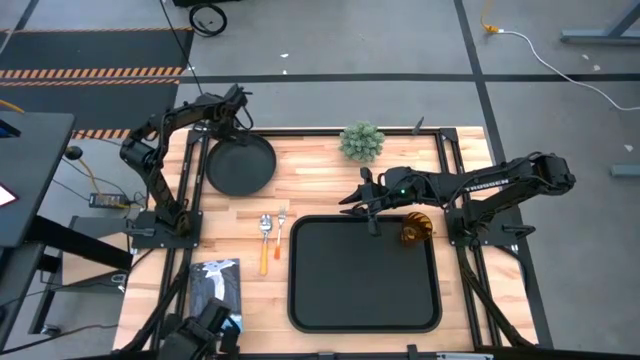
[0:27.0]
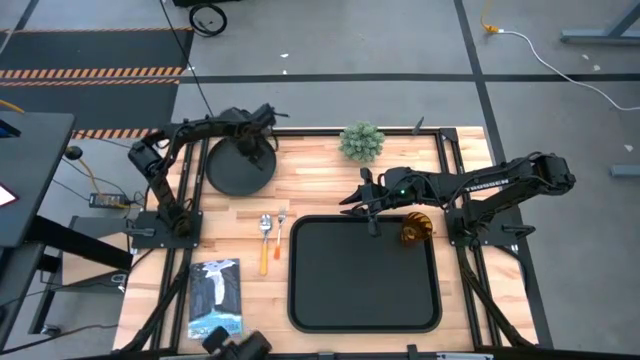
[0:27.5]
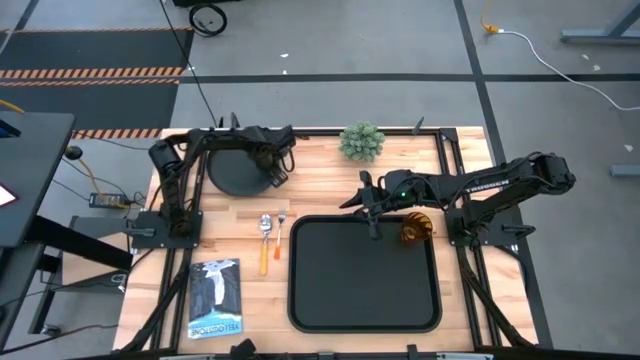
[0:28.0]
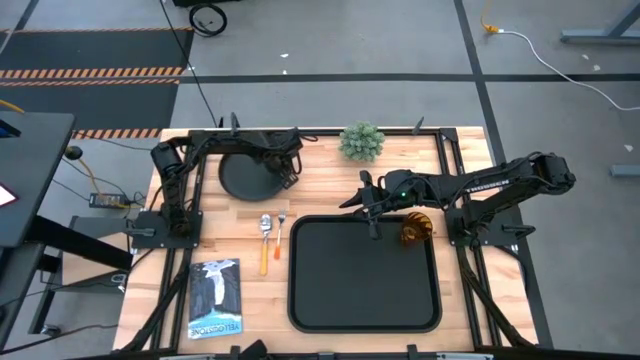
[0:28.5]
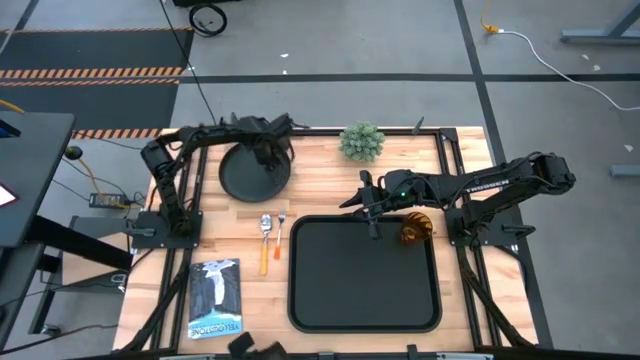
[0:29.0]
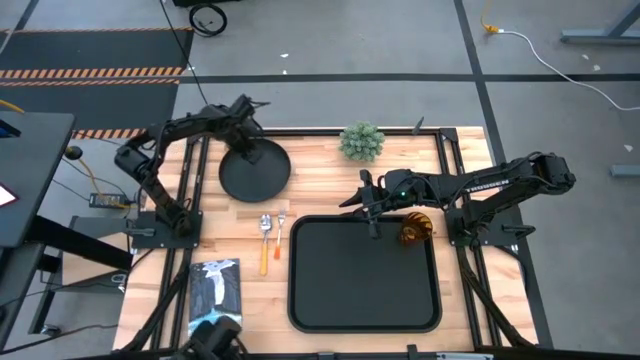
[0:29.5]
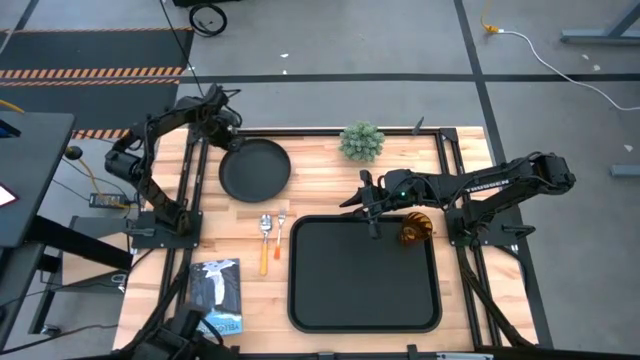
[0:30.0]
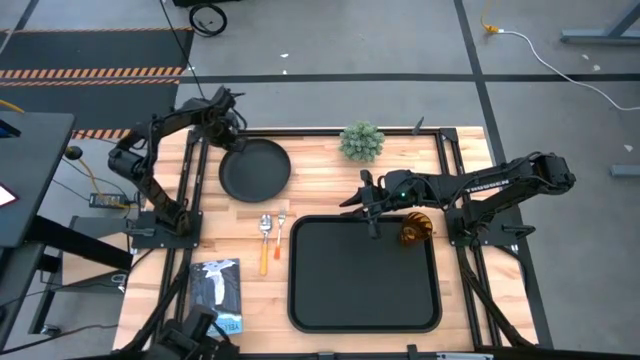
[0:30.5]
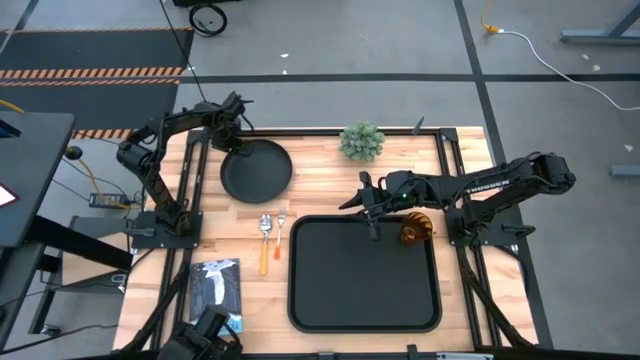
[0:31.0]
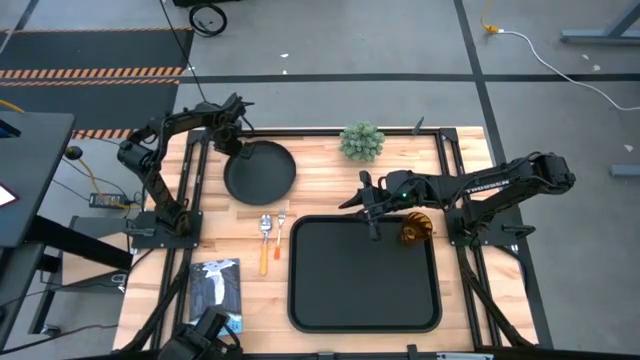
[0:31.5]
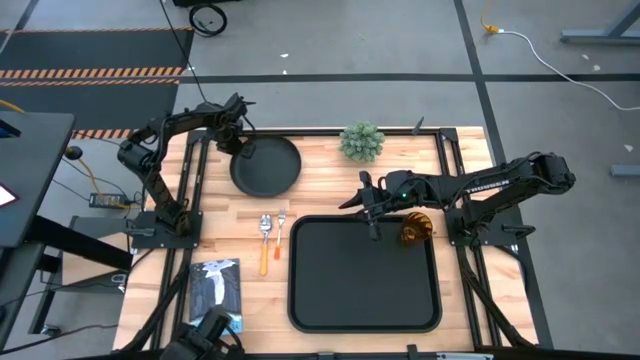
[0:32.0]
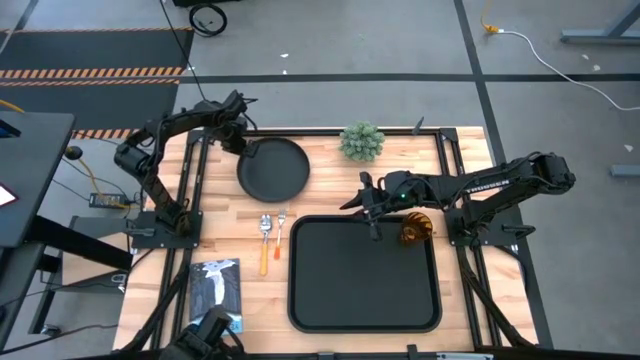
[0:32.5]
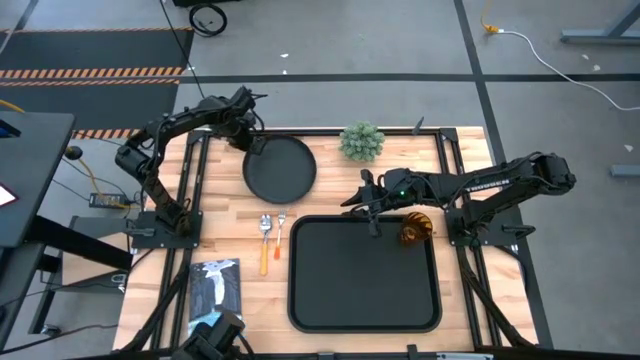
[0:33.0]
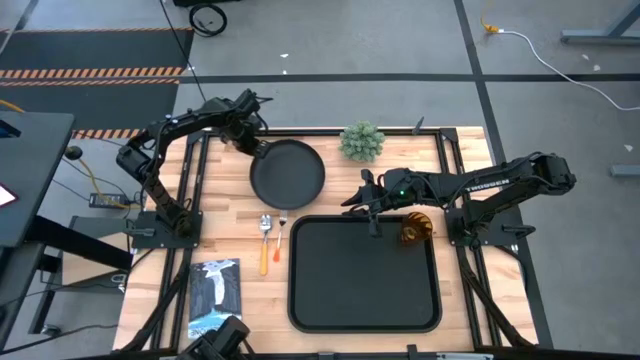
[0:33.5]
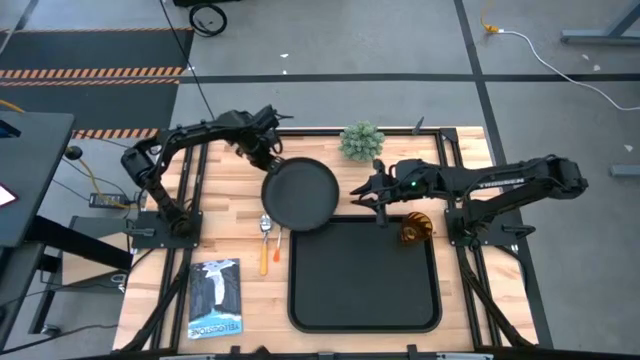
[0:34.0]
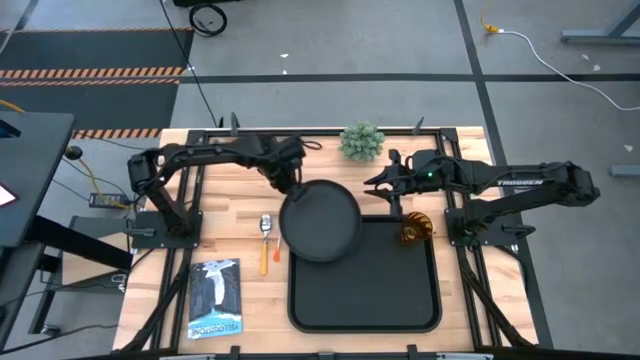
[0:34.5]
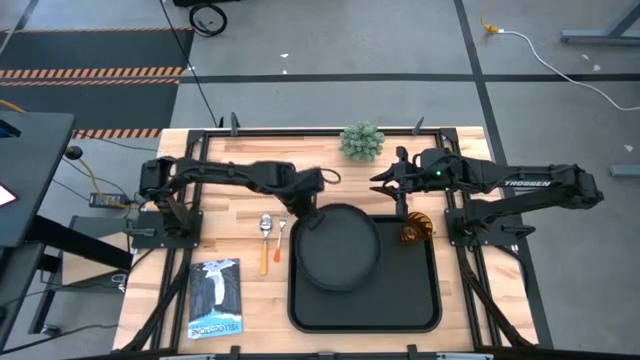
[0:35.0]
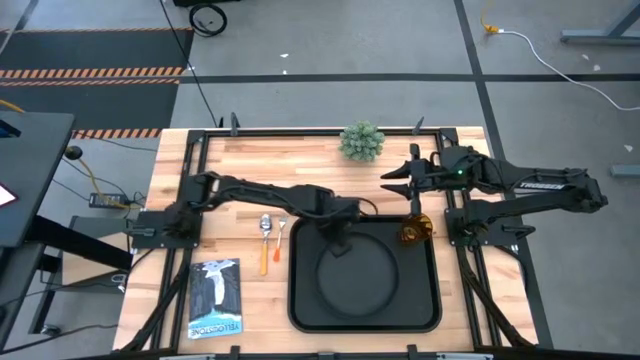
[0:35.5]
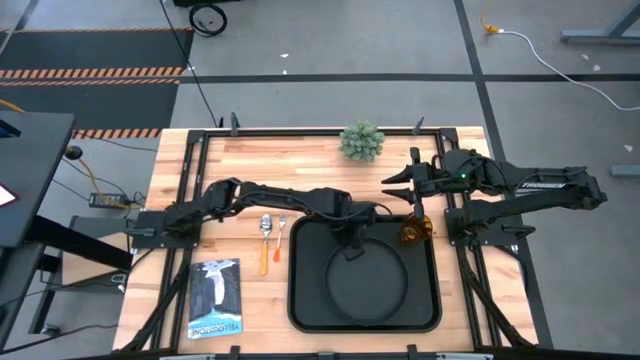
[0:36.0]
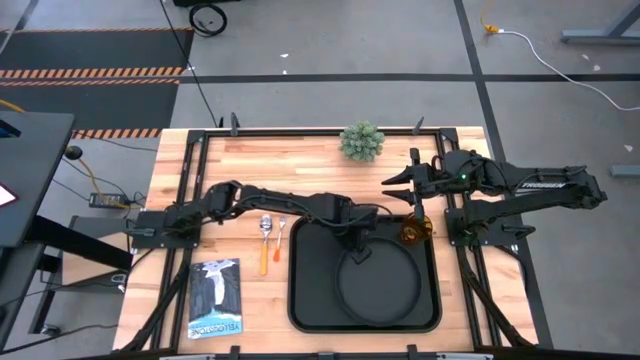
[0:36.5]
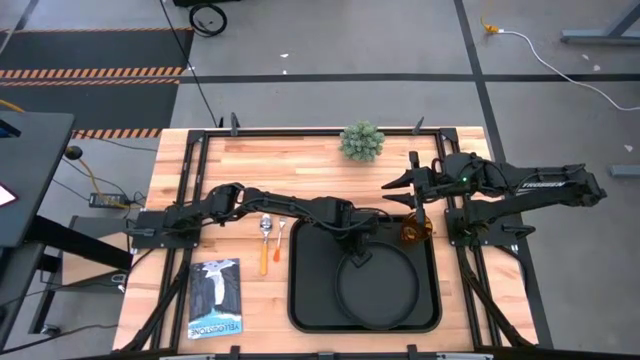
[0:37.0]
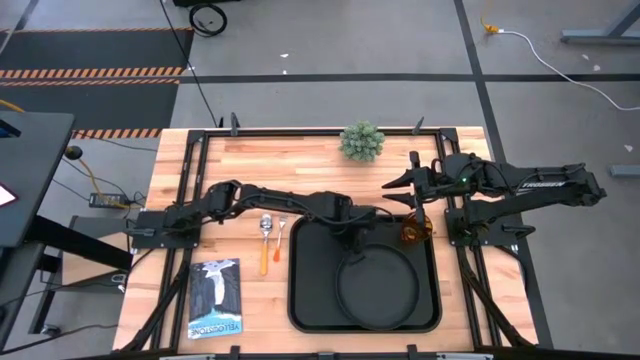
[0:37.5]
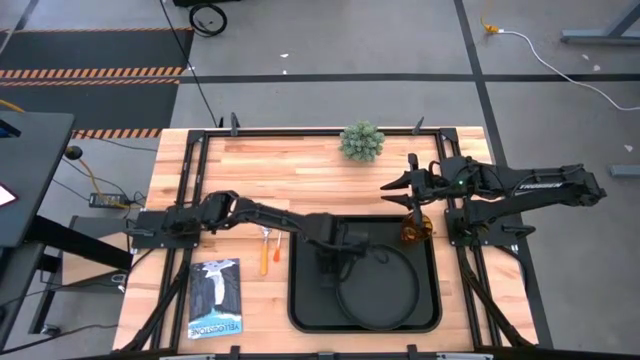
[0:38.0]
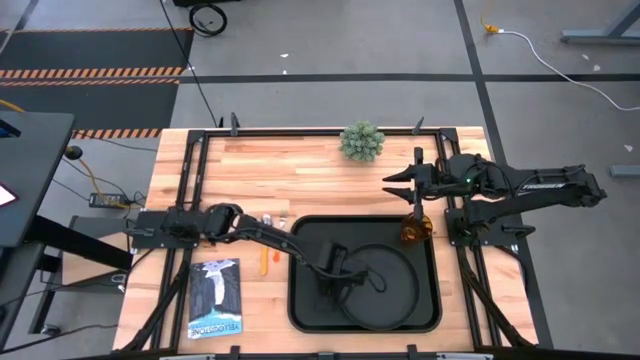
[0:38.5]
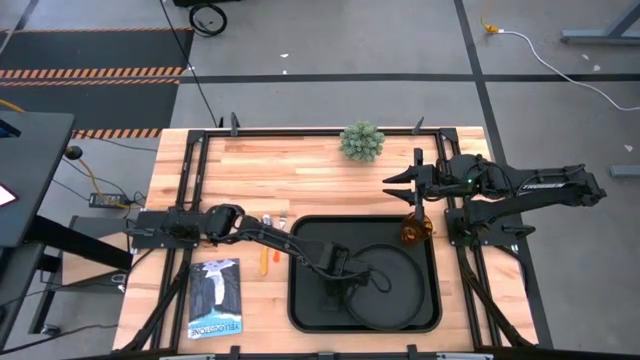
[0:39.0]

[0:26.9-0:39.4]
Task: Pick and place plate/cup/fork/spoon on tray
Put the black plate on the black tray to the bottom left of the brown cup

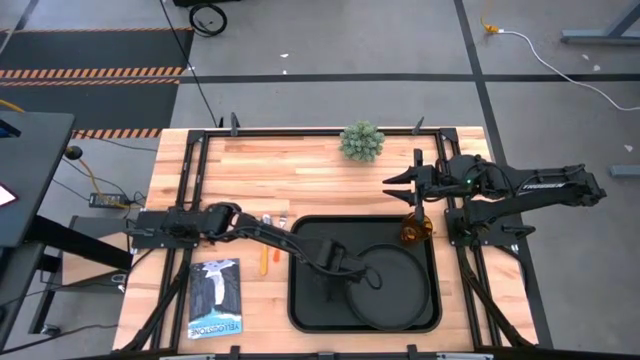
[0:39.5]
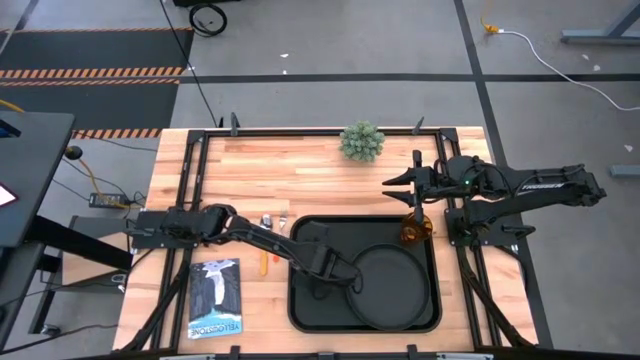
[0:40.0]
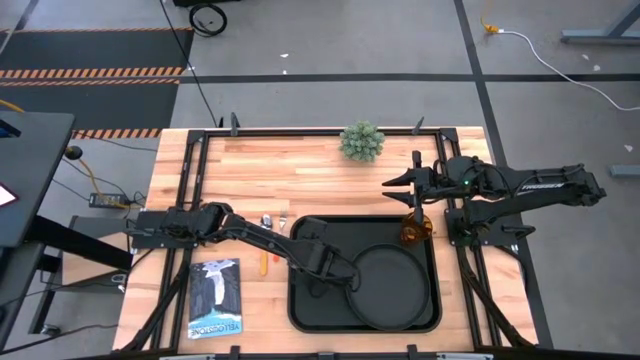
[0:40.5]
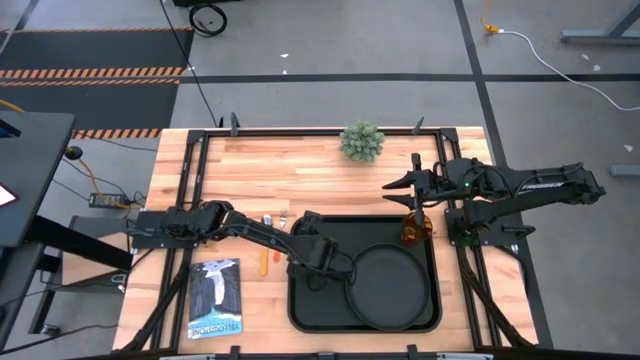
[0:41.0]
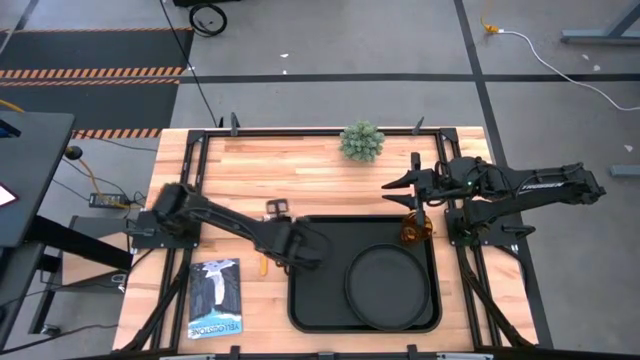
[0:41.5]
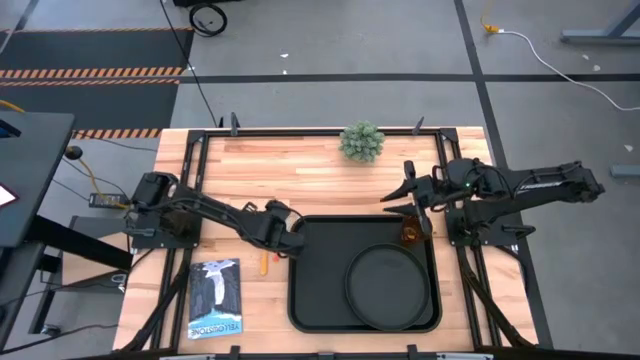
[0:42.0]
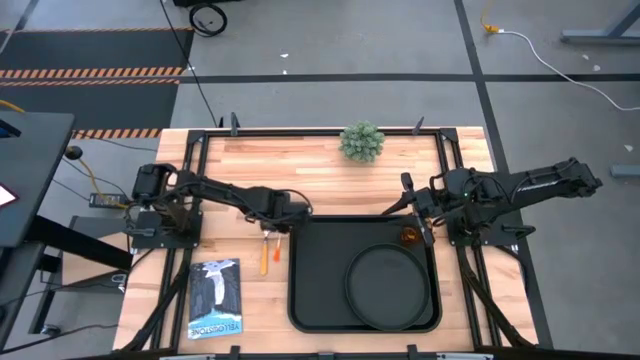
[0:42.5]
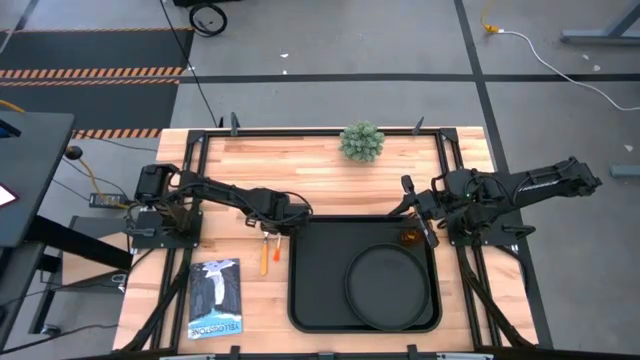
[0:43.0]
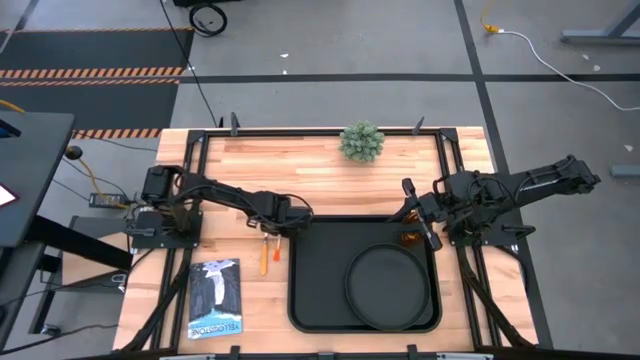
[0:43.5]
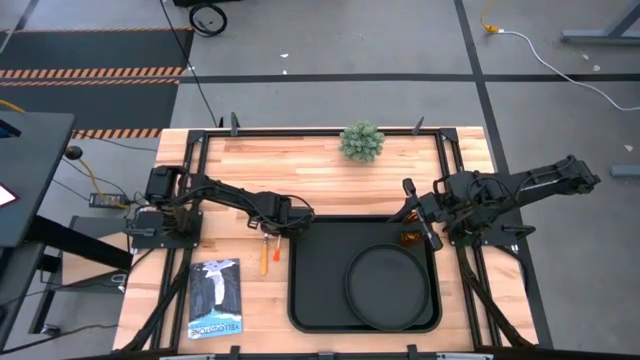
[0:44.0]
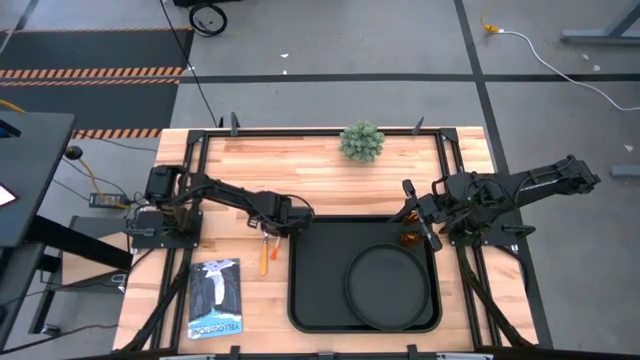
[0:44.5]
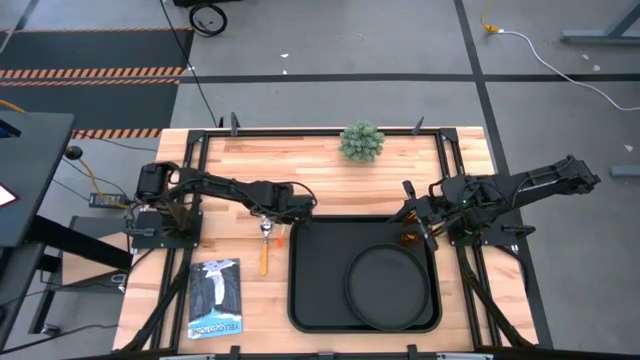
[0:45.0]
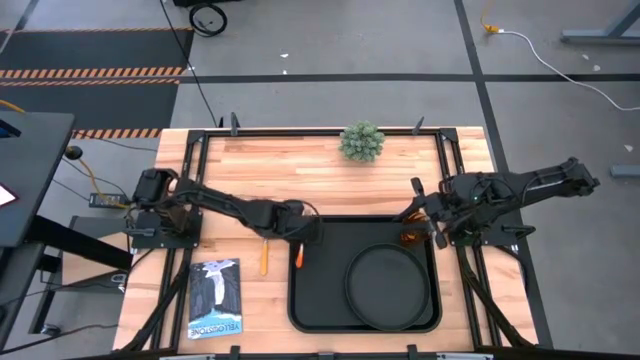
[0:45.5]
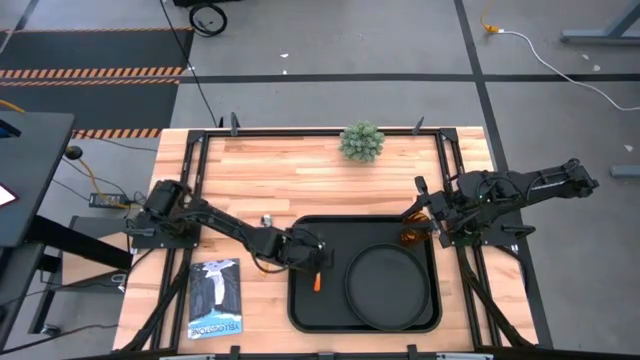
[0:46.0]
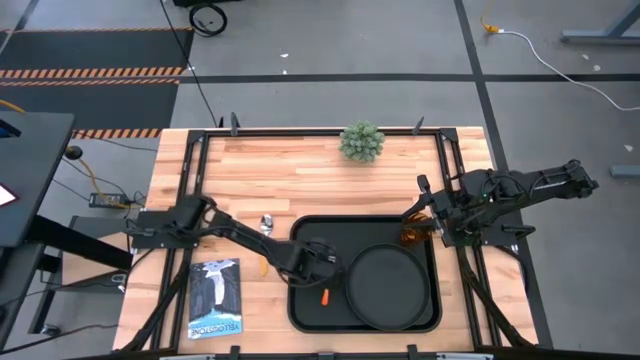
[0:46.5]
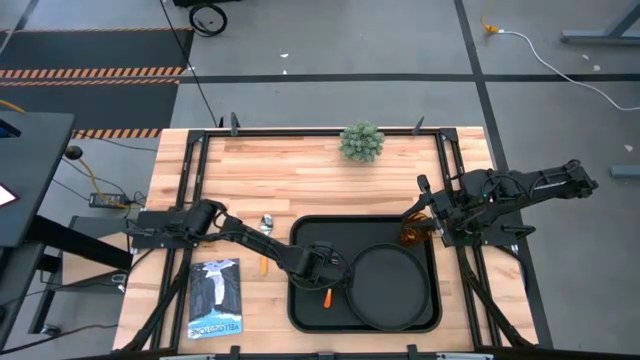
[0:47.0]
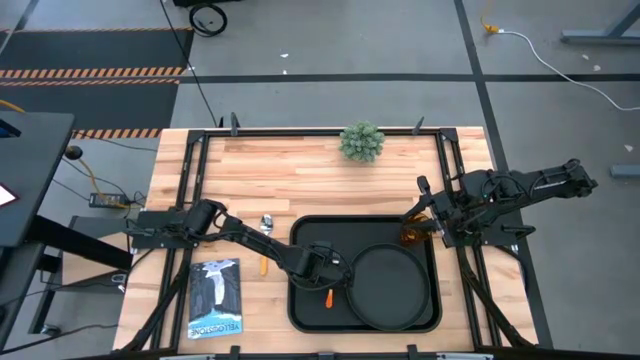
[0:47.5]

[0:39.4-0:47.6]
Put the orange fork on the black tray to the left of the grey plate
